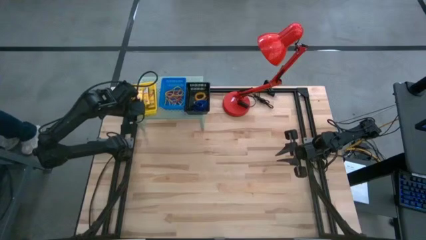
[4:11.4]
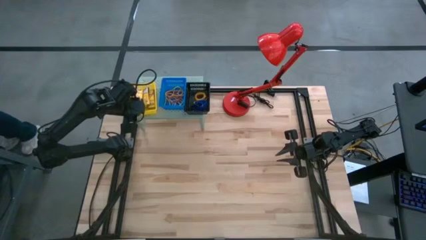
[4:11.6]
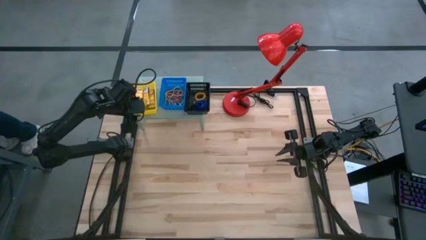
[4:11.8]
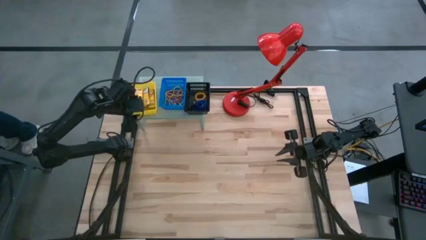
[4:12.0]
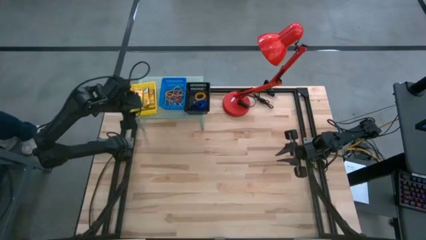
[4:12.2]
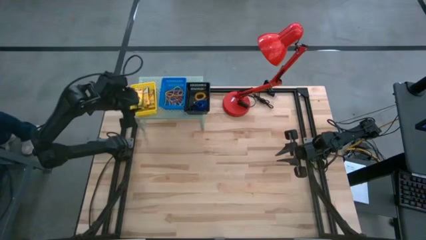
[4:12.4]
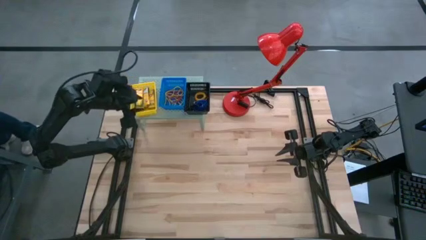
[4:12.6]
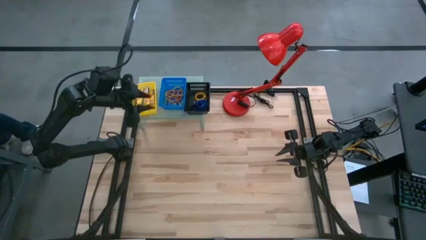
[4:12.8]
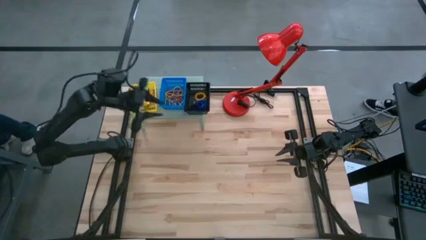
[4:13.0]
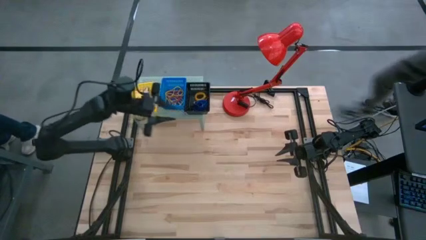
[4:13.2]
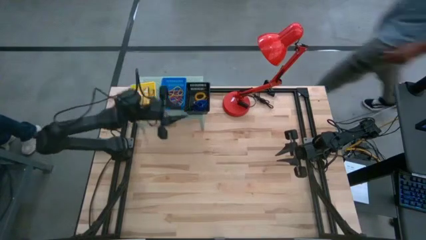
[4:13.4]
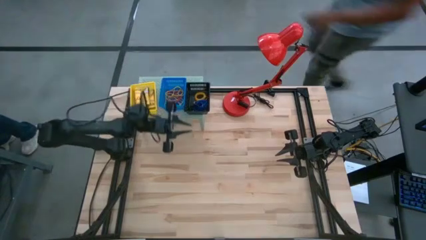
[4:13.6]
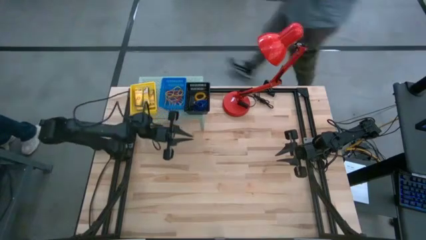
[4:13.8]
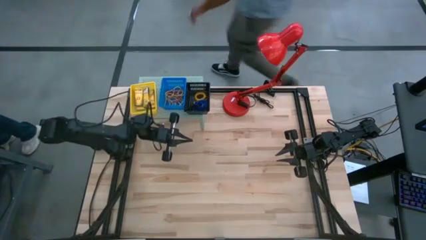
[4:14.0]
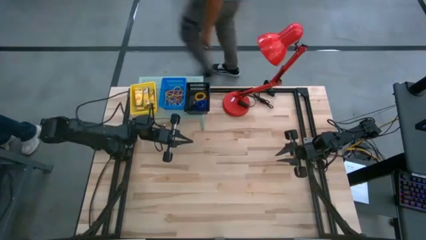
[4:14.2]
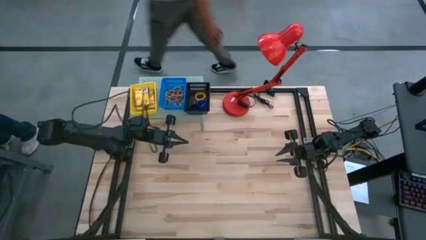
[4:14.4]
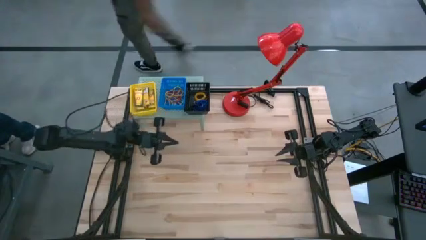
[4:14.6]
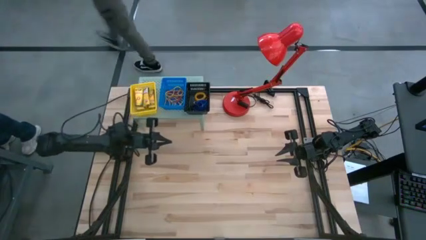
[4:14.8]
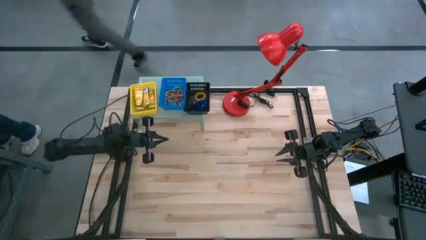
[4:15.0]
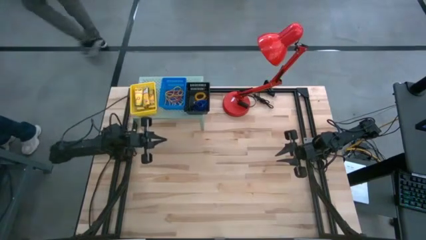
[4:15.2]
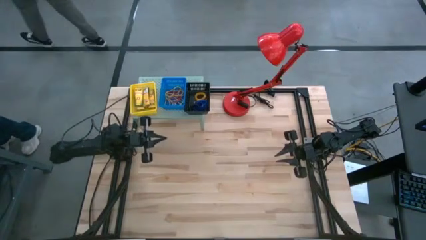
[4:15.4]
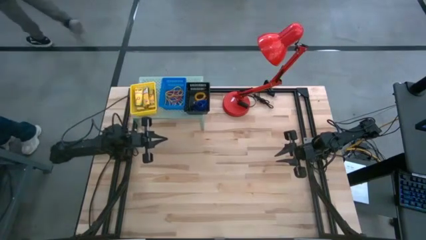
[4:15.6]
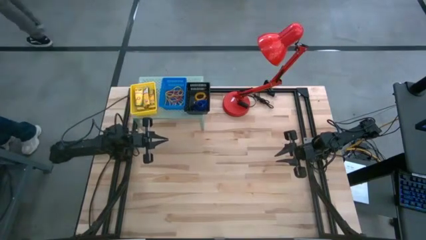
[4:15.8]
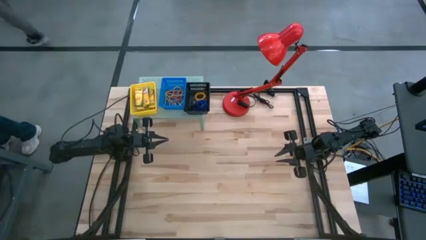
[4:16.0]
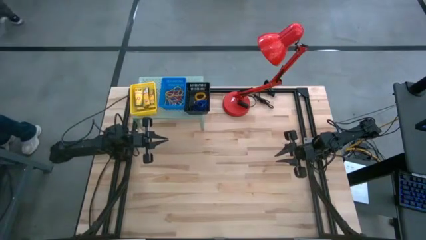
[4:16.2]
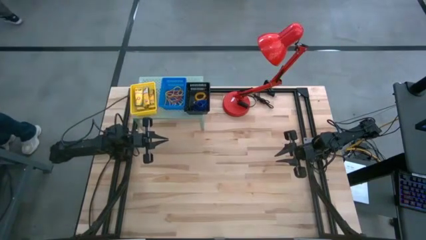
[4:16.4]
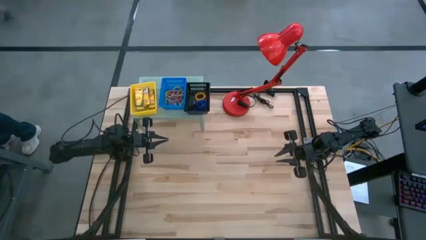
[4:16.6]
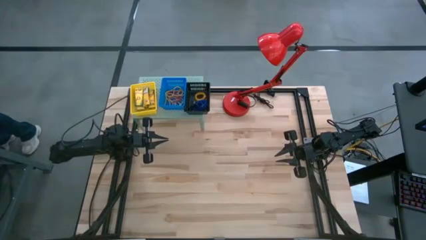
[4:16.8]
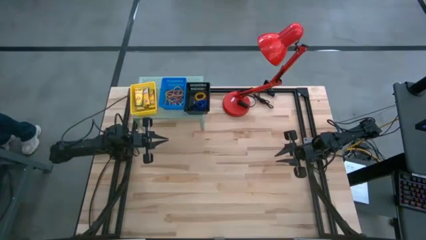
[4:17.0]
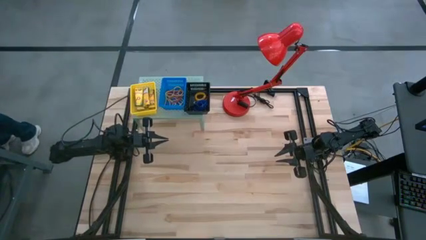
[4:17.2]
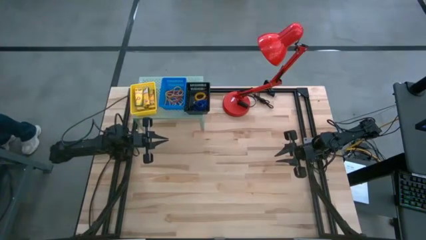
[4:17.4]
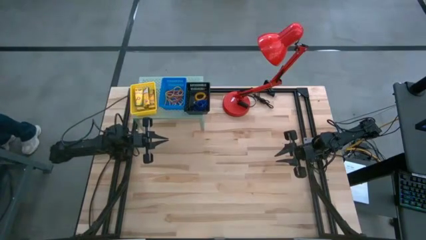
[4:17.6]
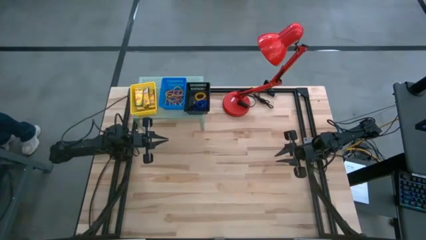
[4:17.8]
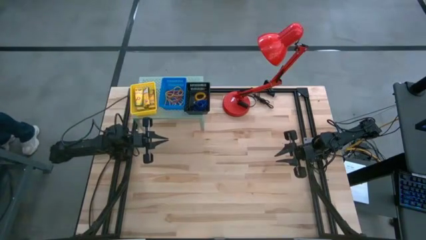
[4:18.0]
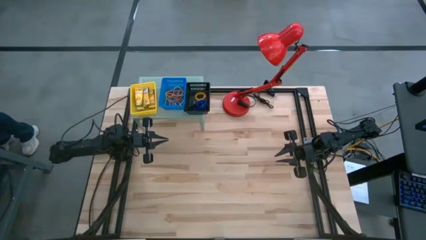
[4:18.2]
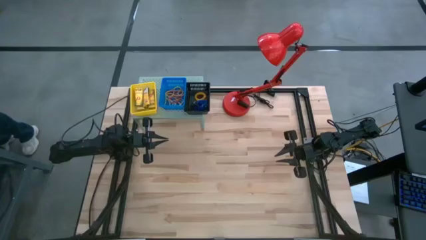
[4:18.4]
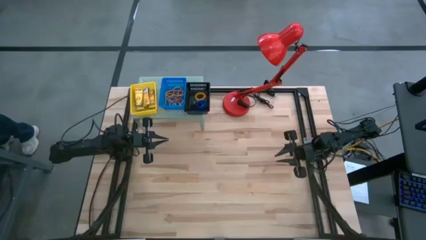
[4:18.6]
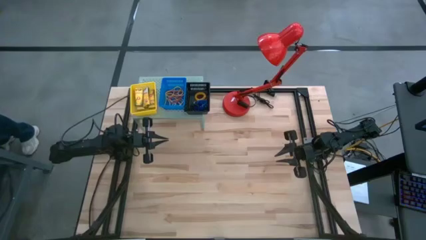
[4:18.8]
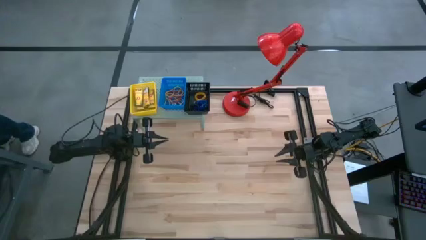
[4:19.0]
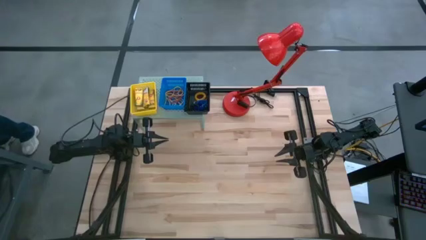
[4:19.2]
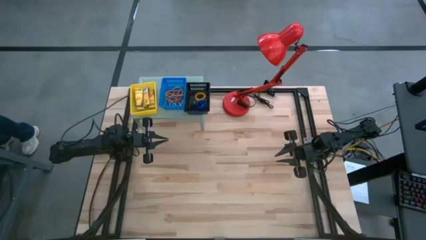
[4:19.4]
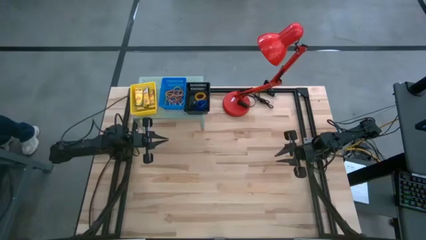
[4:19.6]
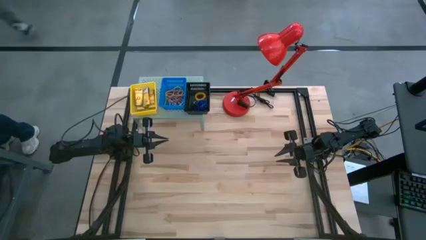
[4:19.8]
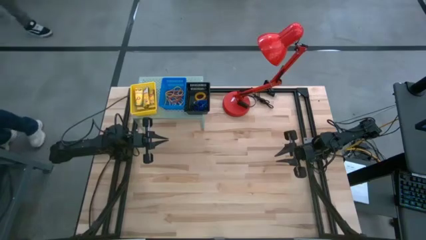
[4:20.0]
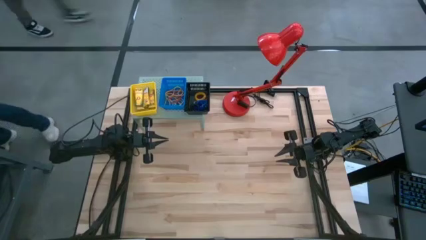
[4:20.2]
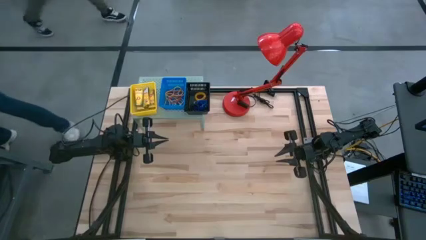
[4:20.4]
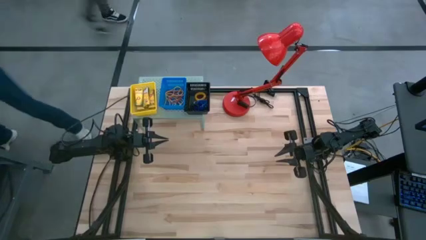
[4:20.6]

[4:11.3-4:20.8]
Task: Pick & Place Office Desk Supplies
Return to Home Position

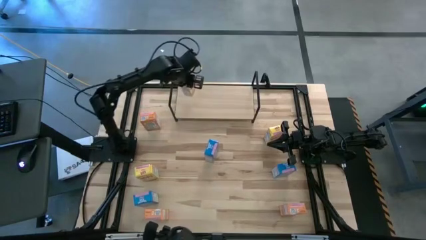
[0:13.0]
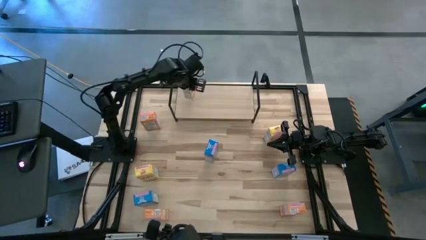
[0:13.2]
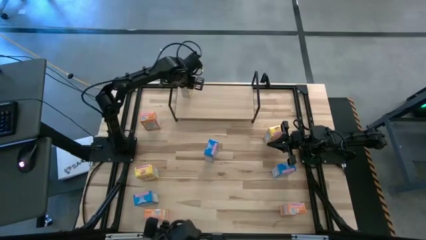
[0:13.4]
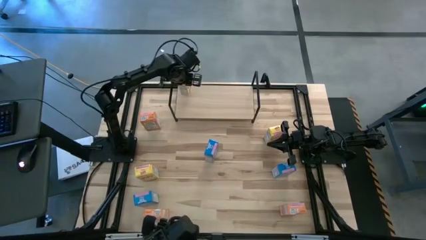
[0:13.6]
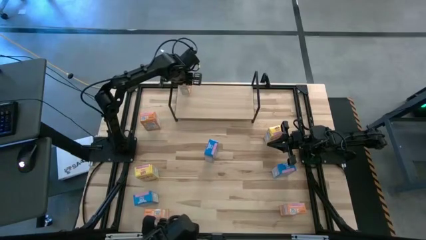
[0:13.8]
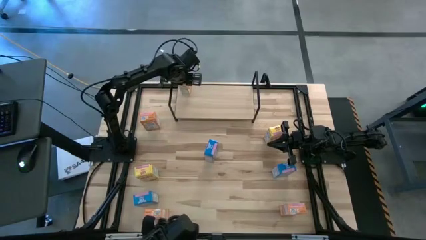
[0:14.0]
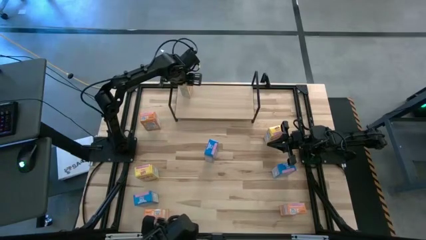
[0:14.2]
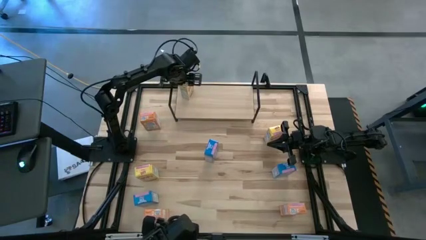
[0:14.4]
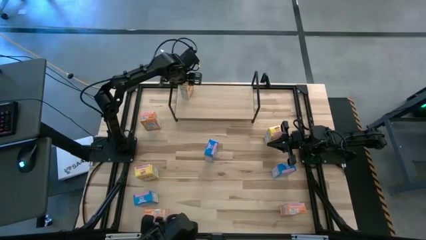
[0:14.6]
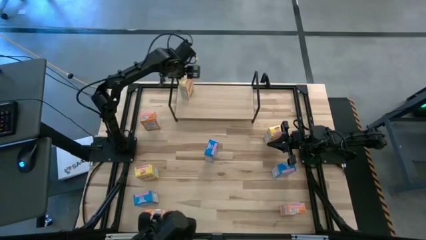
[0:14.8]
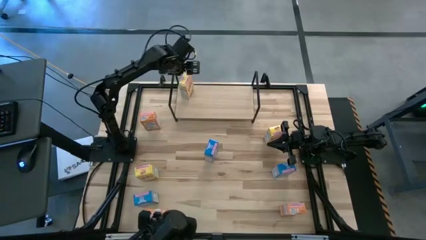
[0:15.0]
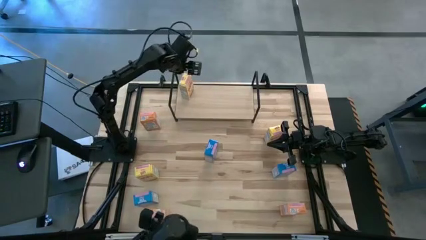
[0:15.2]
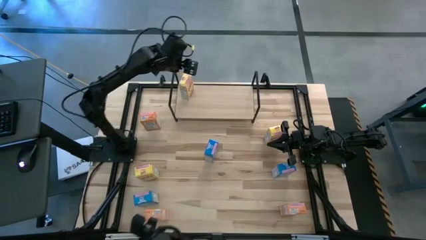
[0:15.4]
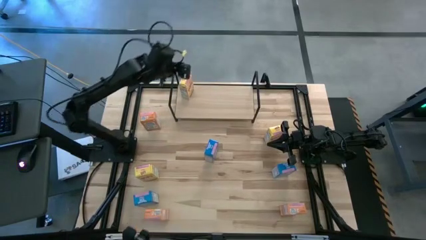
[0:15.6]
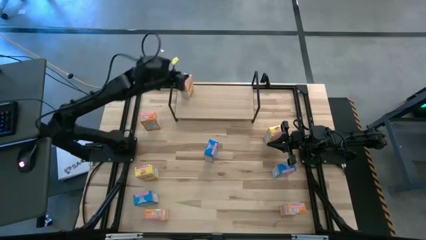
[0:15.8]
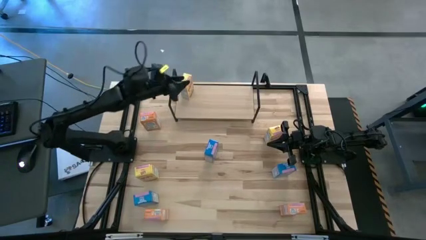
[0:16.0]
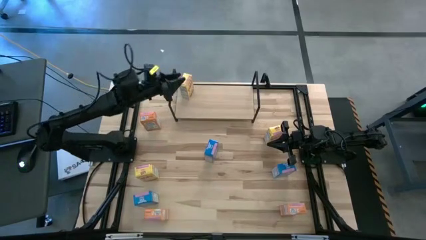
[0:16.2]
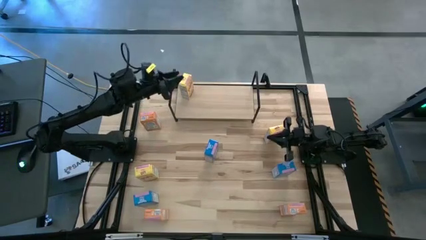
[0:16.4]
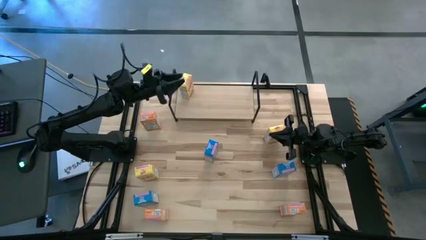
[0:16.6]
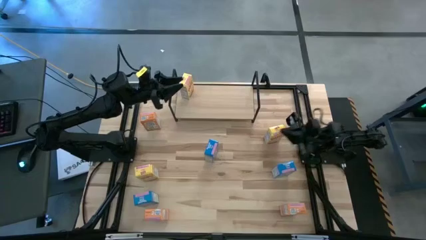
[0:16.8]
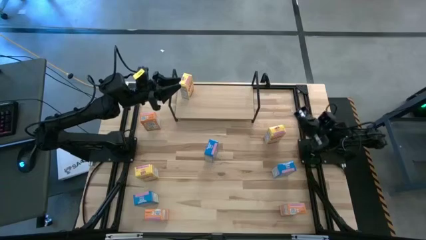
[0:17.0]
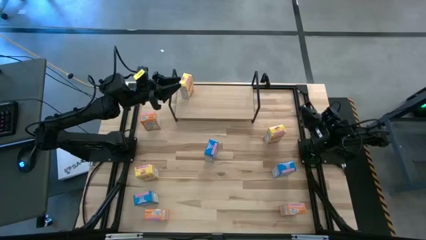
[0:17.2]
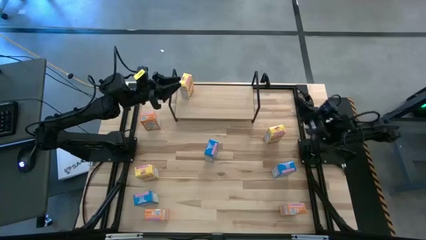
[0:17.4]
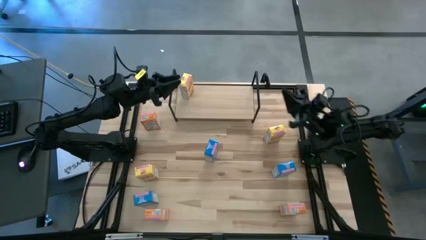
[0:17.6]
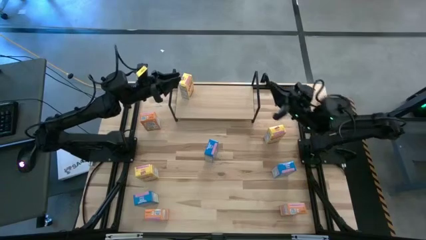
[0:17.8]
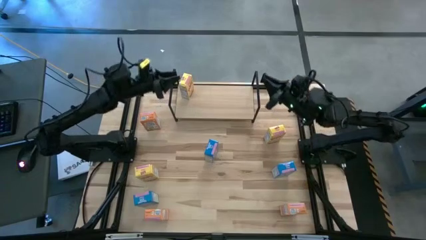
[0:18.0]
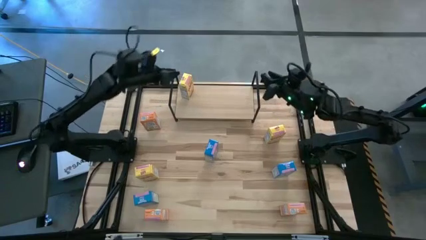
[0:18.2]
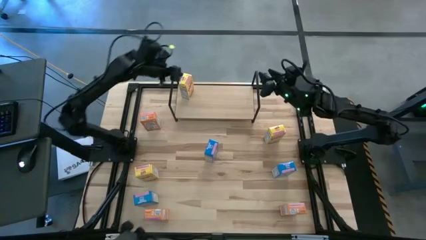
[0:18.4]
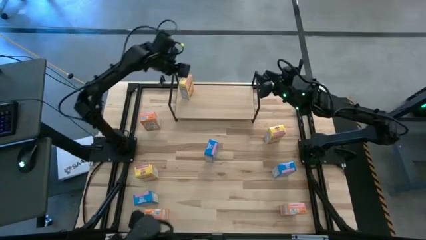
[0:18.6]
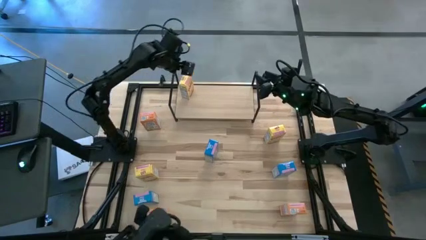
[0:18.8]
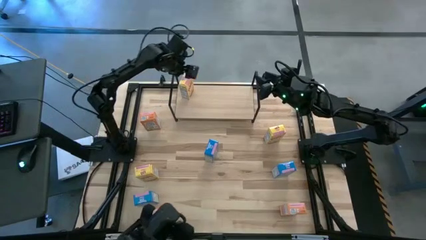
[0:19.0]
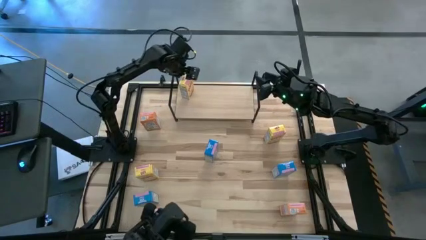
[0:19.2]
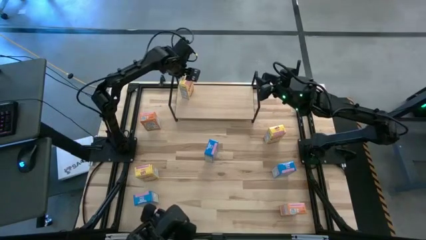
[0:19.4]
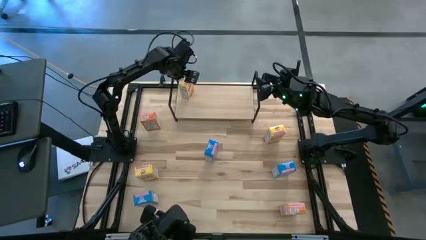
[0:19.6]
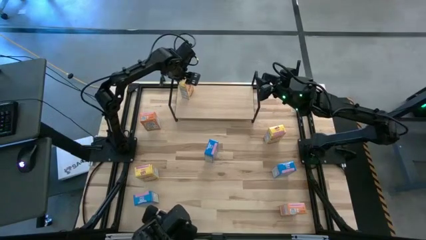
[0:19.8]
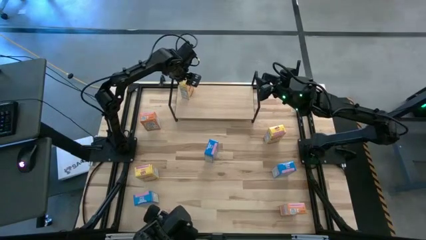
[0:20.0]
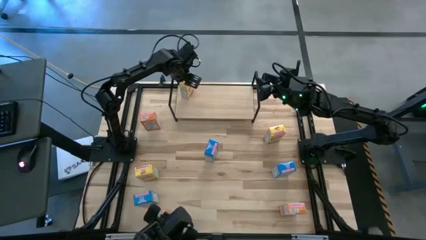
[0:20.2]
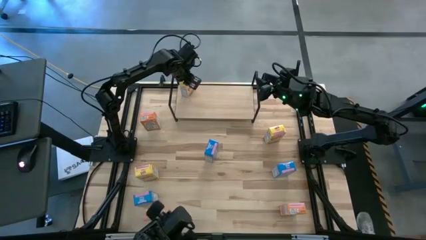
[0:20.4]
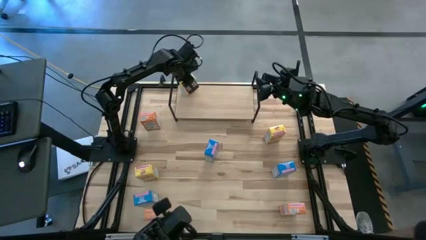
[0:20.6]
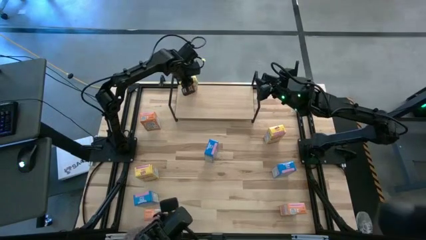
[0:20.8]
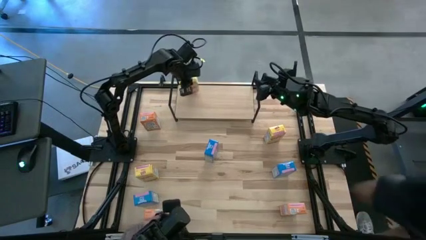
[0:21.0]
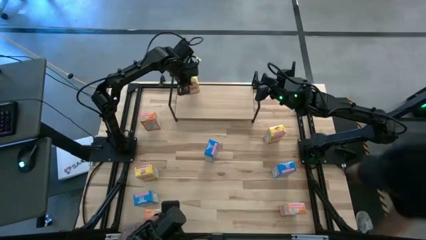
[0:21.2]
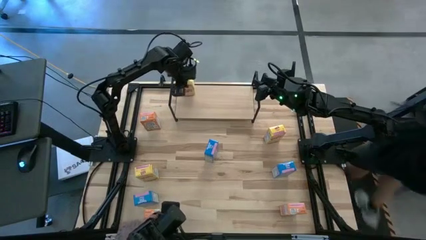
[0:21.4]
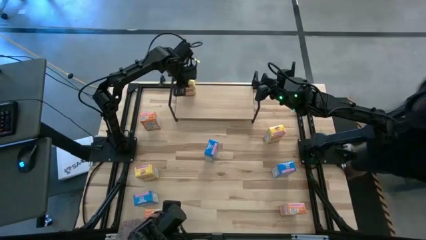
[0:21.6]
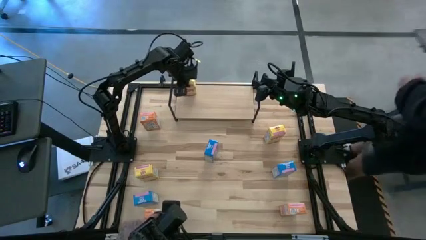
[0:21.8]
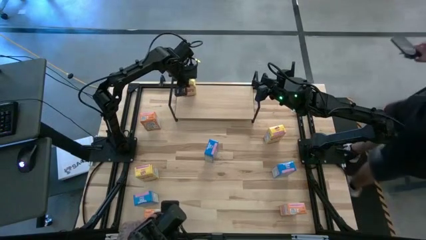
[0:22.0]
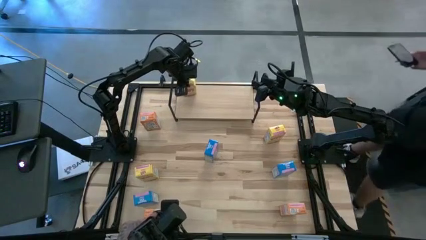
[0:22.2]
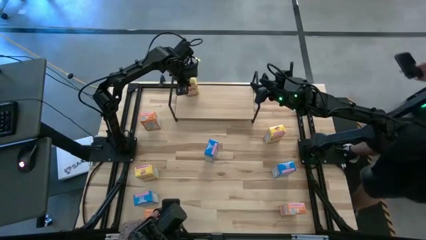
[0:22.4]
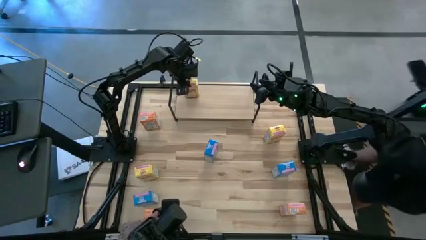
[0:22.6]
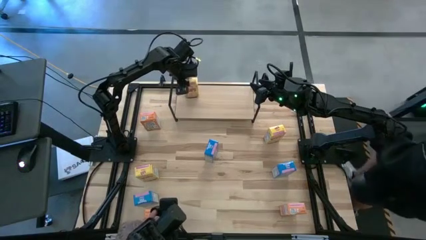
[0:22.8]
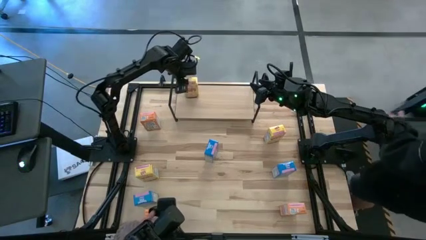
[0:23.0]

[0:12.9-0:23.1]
Task: Stack cereal on shelf
Put the middle yellow cereal box on the shelf
